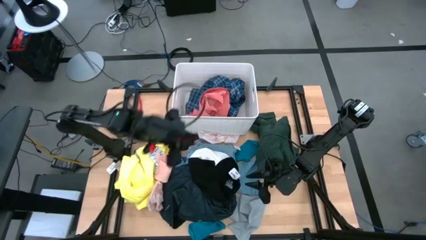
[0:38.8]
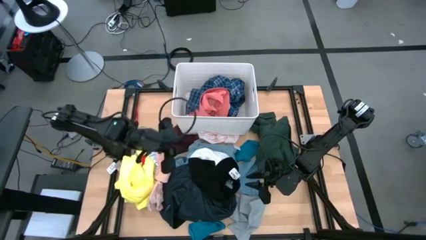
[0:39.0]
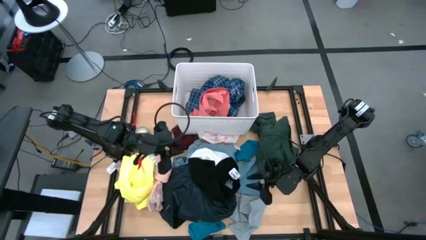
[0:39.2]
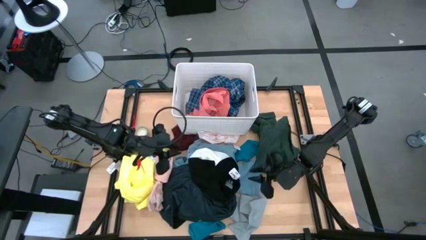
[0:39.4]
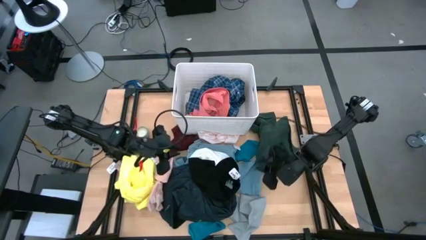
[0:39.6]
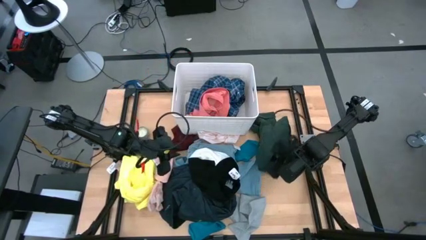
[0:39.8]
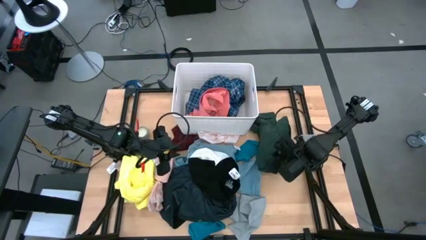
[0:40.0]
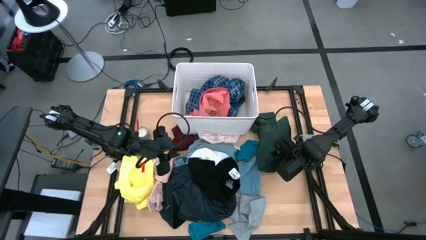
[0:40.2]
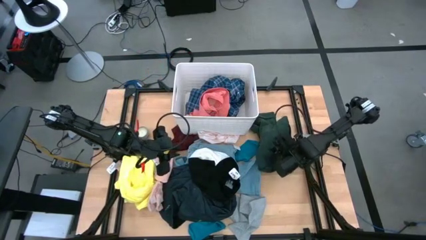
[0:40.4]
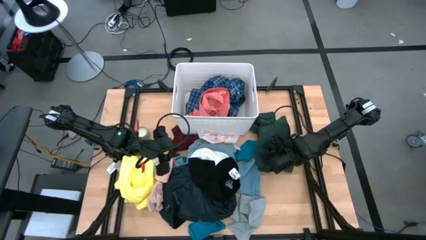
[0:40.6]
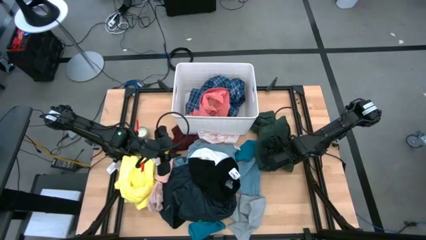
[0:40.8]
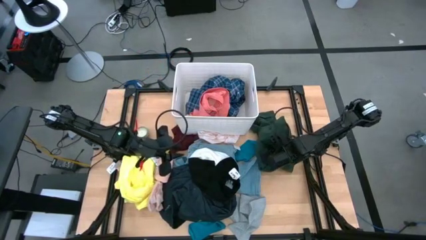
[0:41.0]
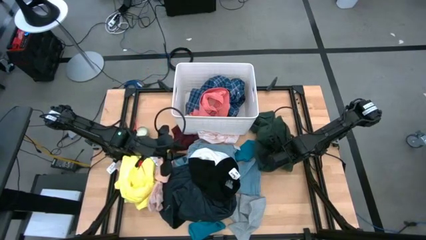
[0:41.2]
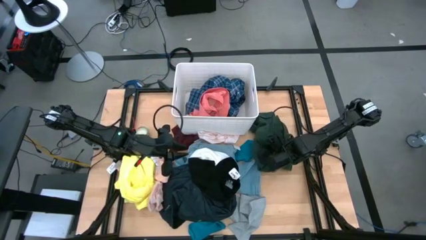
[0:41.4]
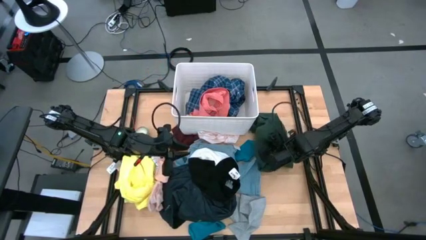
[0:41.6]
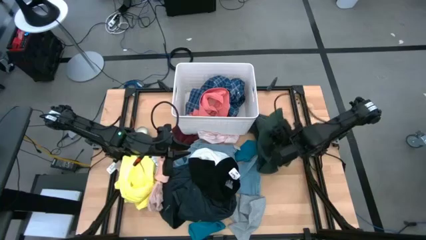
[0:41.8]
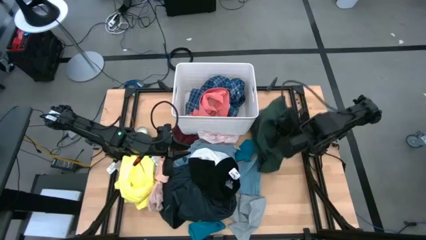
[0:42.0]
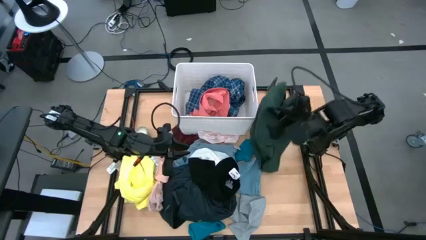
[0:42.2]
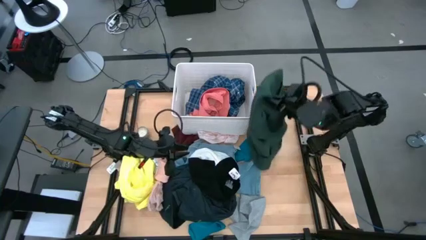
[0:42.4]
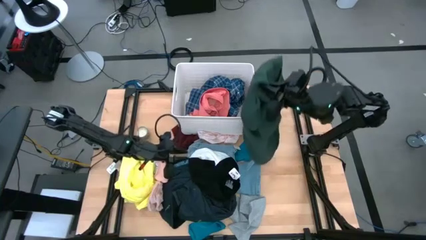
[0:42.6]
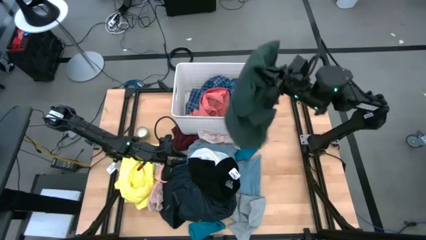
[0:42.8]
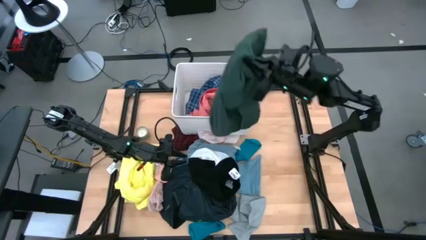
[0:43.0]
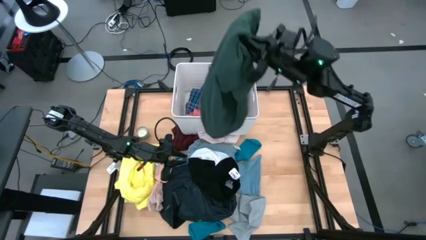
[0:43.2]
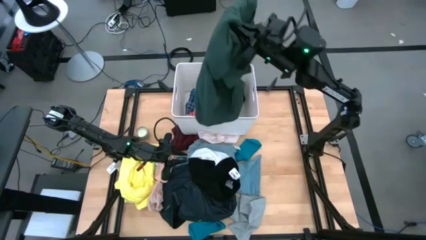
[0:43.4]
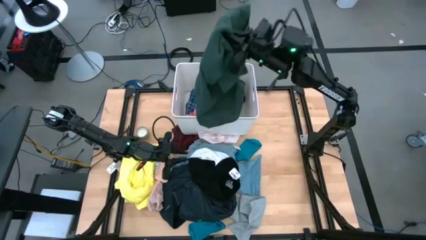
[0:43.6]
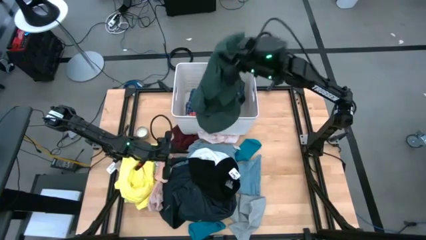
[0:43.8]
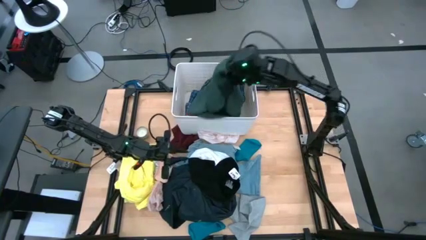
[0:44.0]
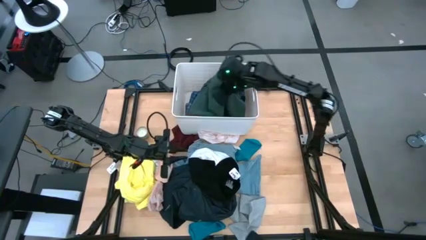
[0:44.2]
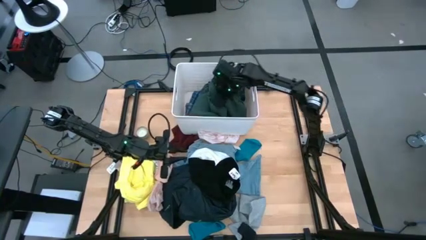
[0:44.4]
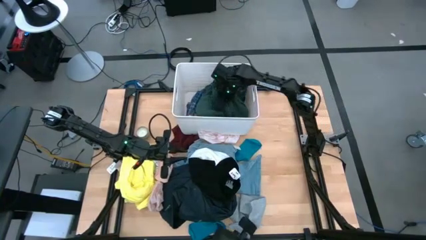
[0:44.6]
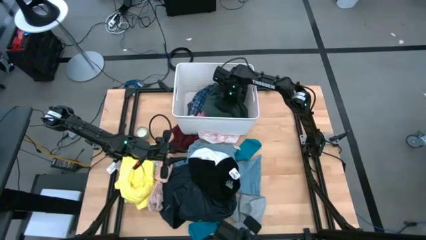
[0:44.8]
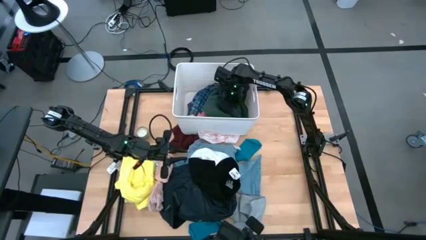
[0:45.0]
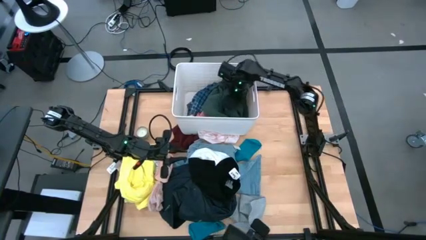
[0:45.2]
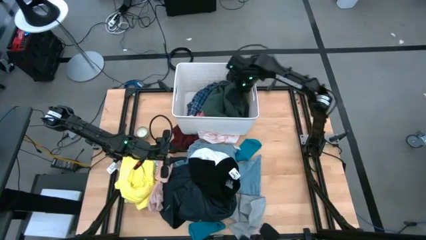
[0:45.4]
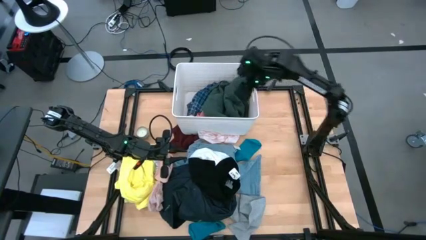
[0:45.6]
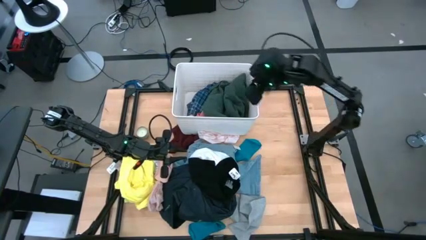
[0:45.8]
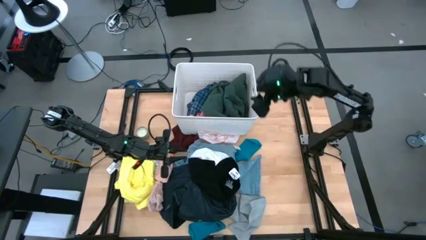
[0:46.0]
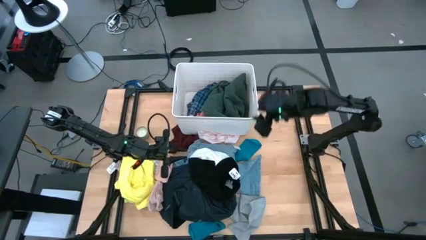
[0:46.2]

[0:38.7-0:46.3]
Task: Sort clothes
Put the green sweater into the white laundry bin

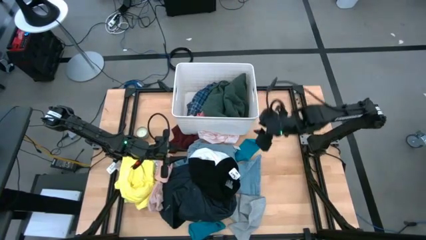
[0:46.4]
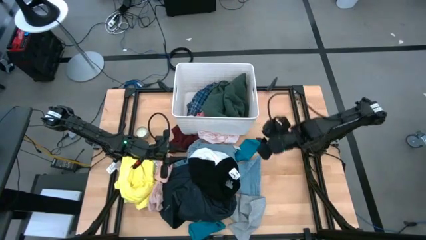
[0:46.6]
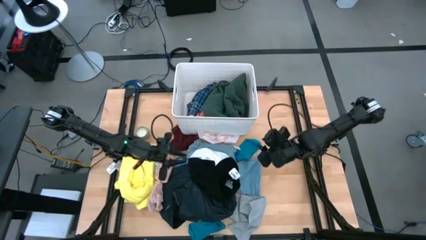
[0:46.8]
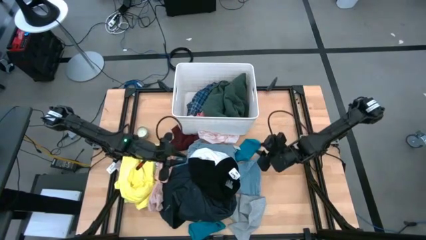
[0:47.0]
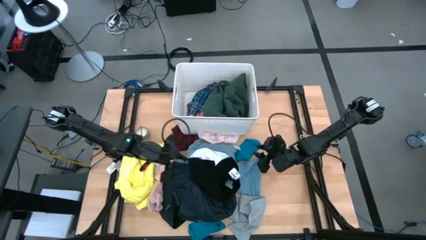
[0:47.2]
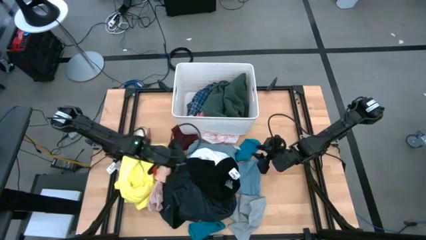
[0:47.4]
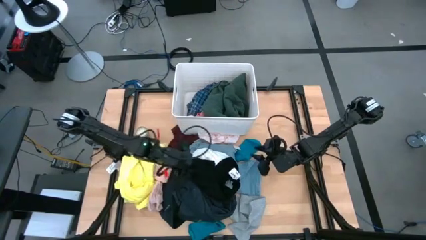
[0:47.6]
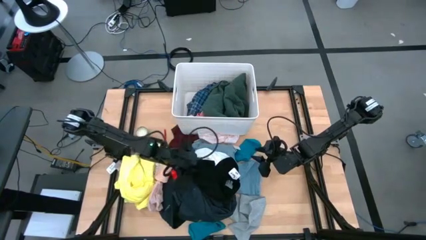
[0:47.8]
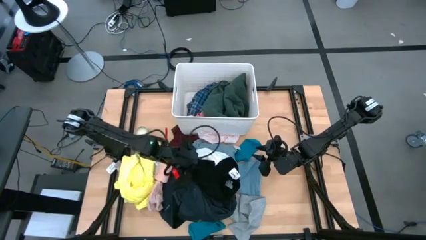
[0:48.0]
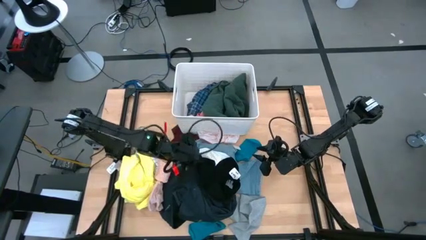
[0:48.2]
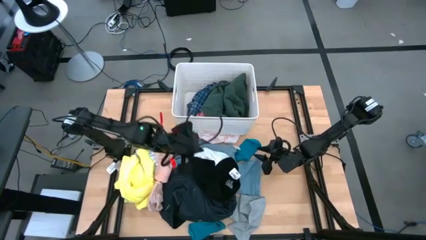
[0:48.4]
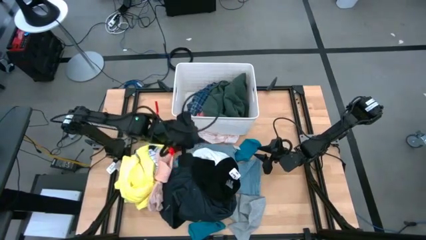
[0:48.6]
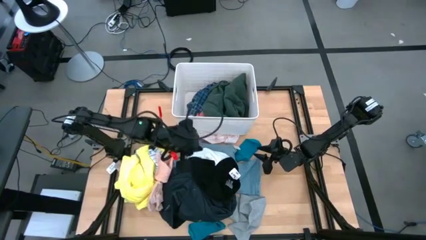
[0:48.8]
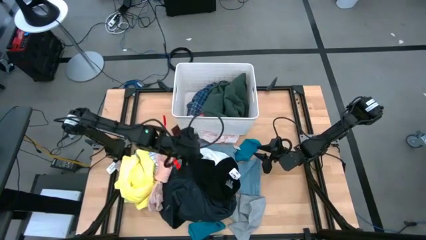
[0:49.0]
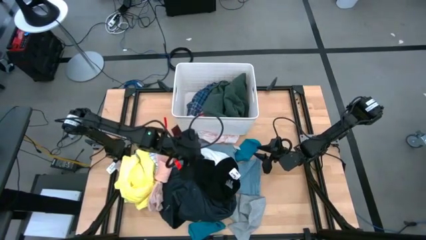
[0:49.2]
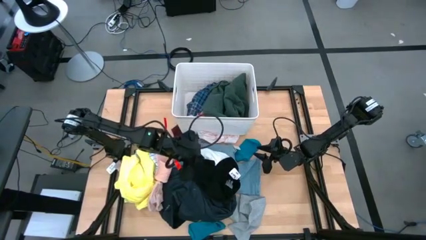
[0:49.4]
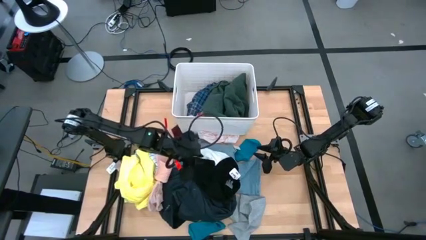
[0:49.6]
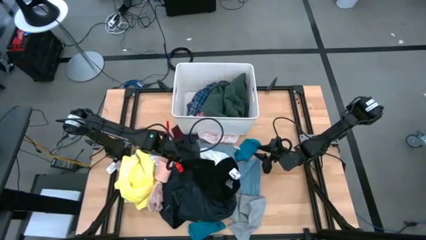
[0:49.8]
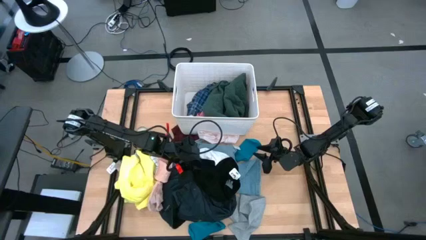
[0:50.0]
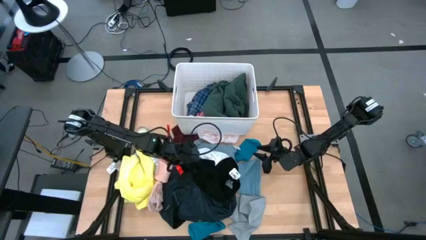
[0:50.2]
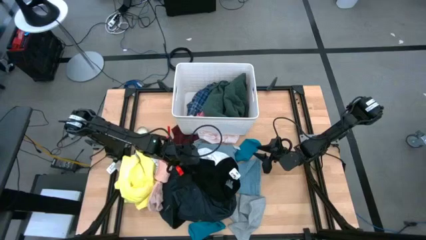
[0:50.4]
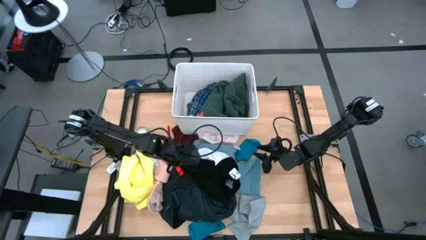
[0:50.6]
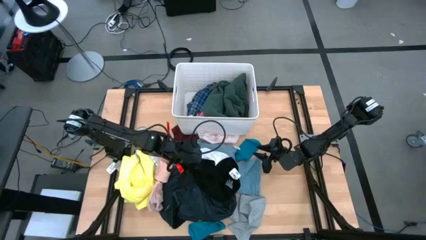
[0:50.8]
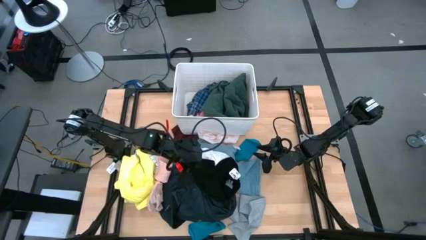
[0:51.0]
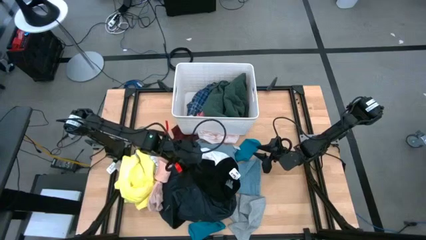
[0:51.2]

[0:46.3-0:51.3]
Put the black underwear into the white laundry bin

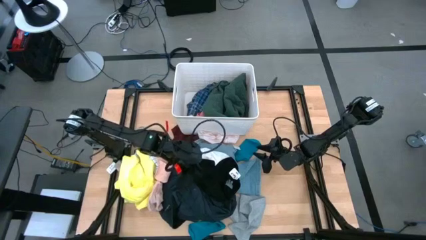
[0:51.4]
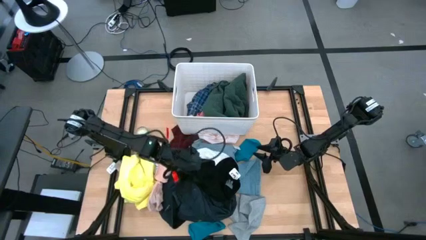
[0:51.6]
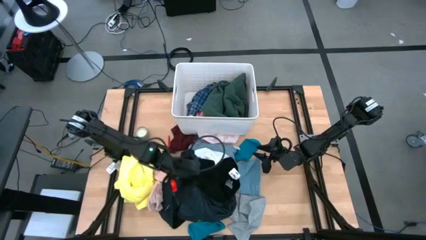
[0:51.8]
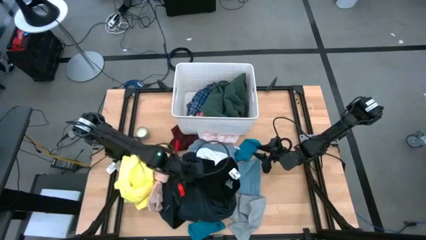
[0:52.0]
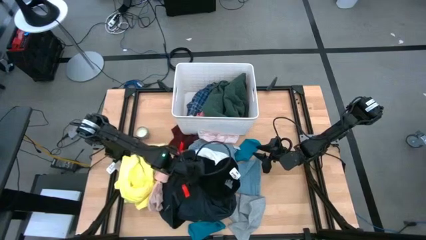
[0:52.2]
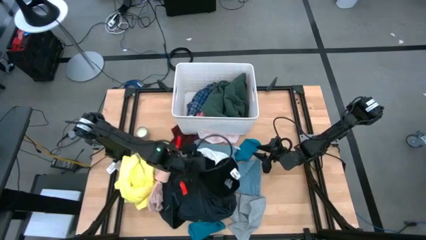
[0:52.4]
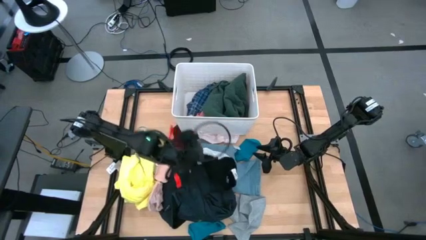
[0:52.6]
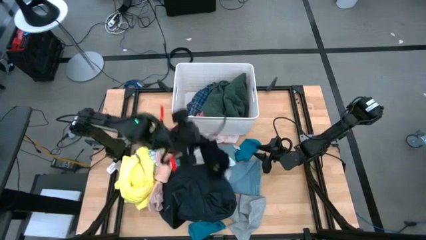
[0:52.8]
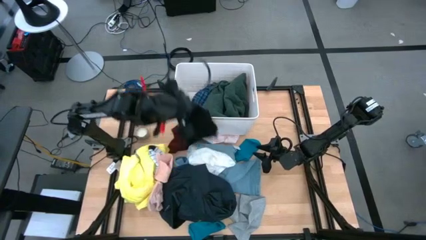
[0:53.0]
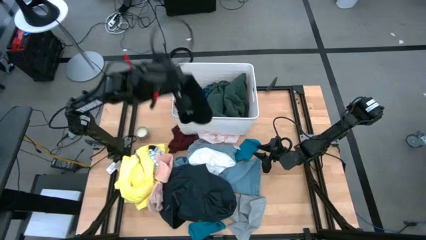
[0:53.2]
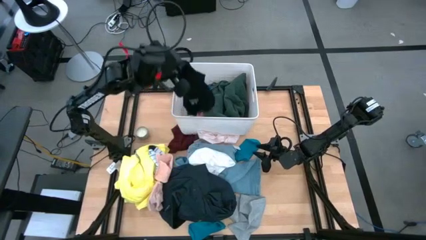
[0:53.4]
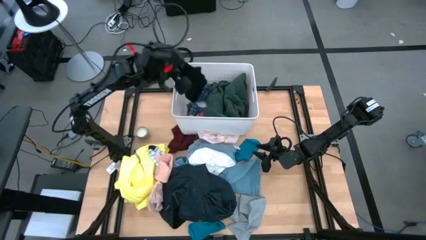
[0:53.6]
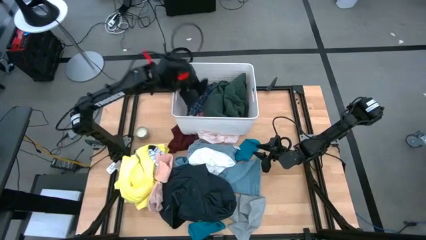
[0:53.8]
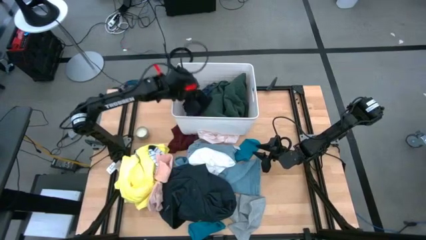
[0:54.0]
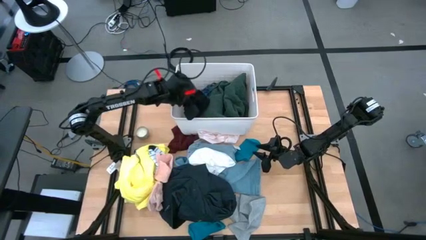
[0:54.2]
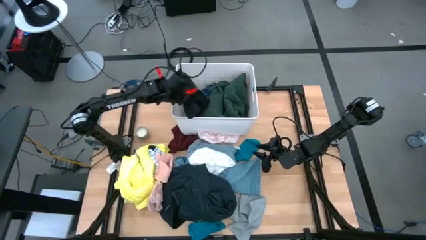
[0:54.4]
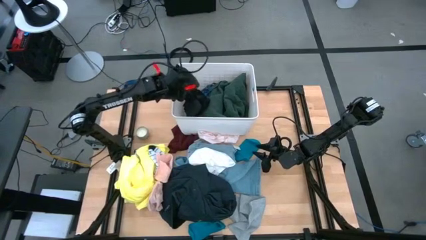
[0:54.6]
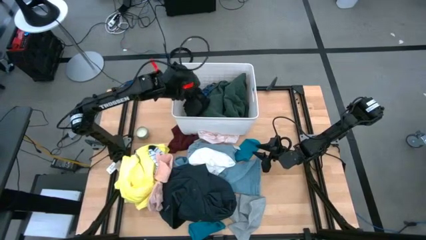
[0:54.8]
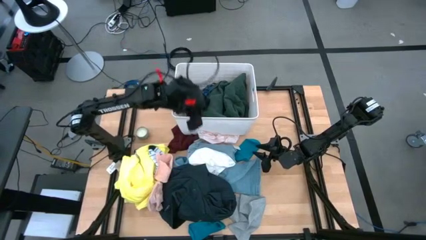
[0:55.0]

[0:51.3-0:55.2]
Put the black underwear into the white laundry bin
